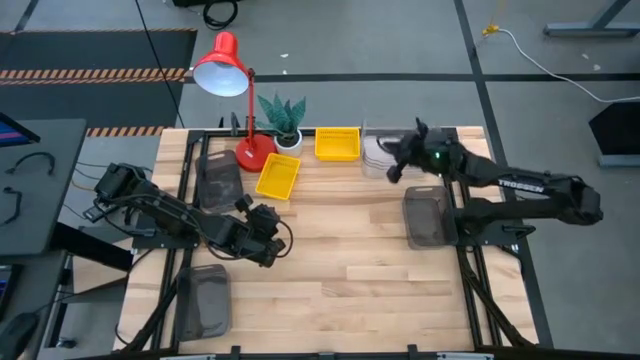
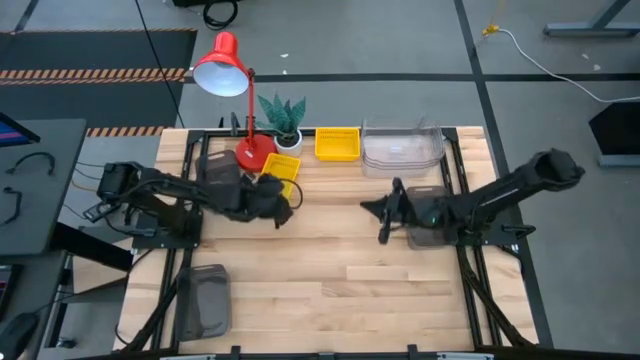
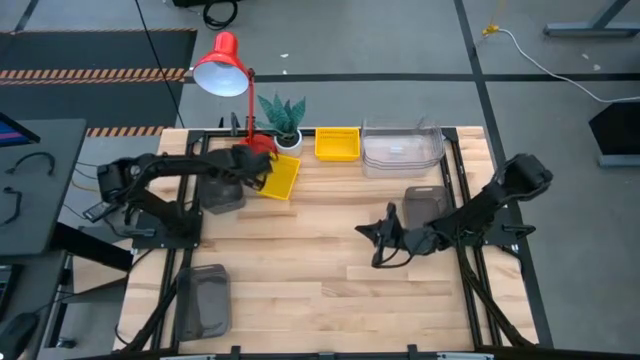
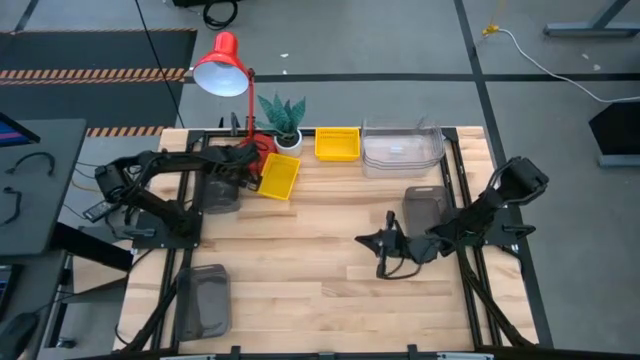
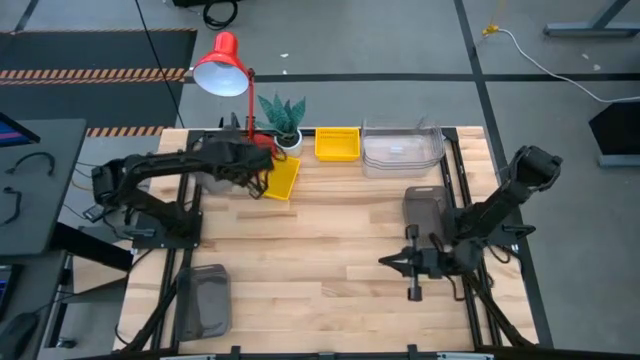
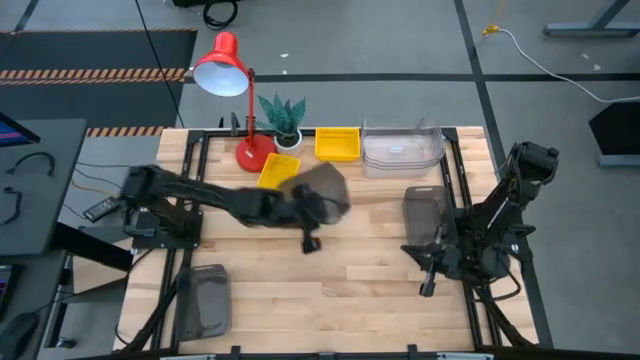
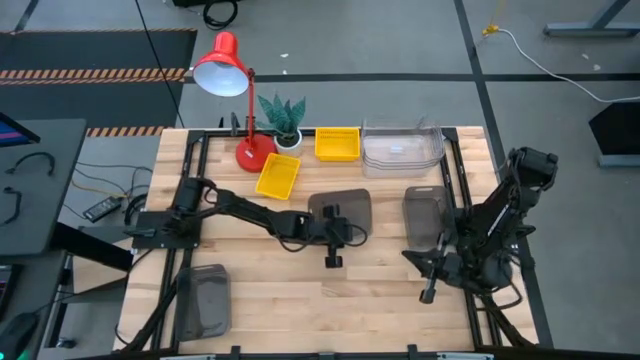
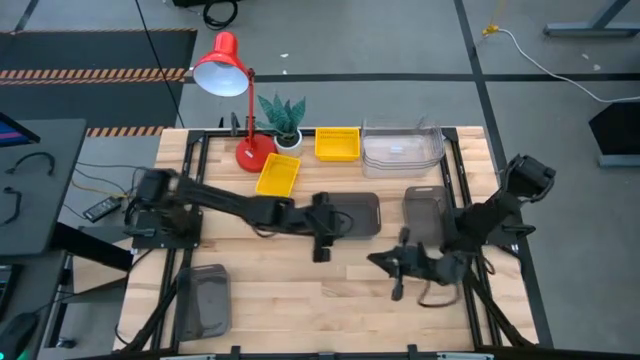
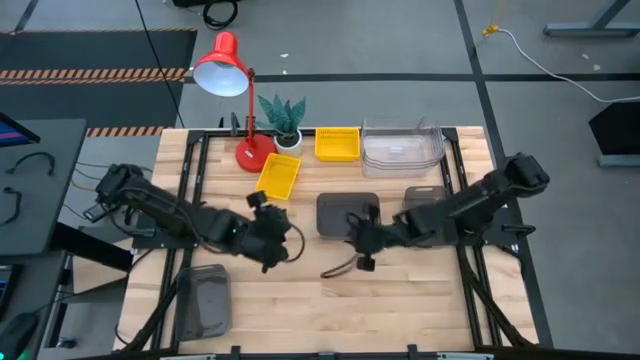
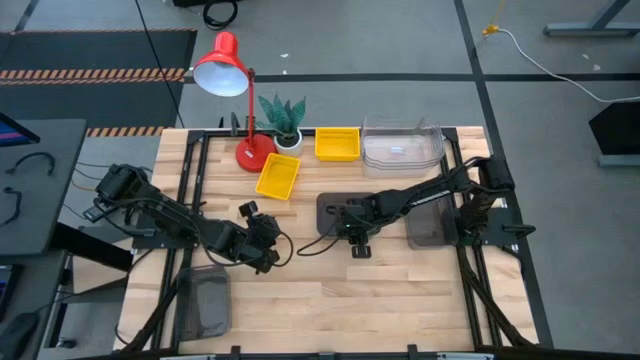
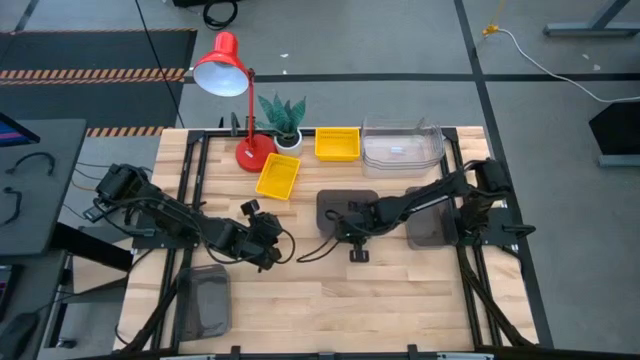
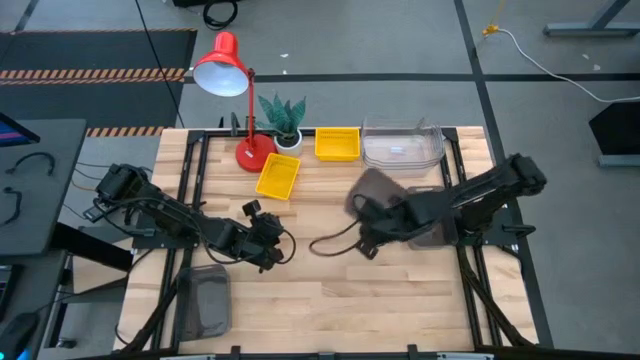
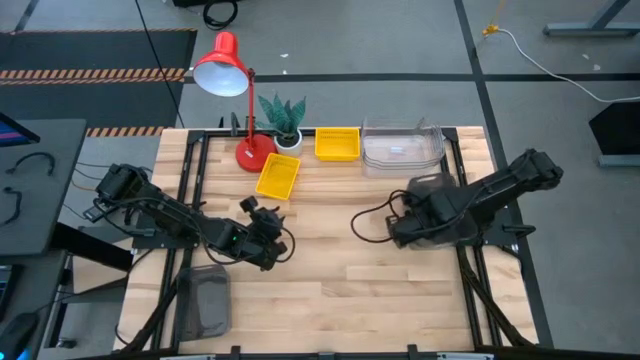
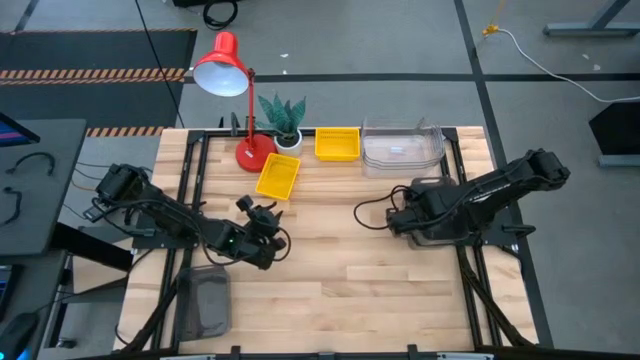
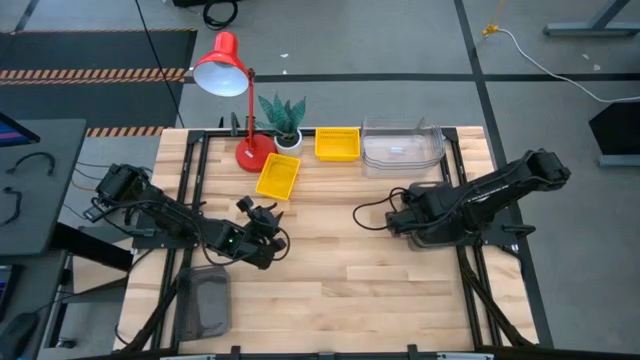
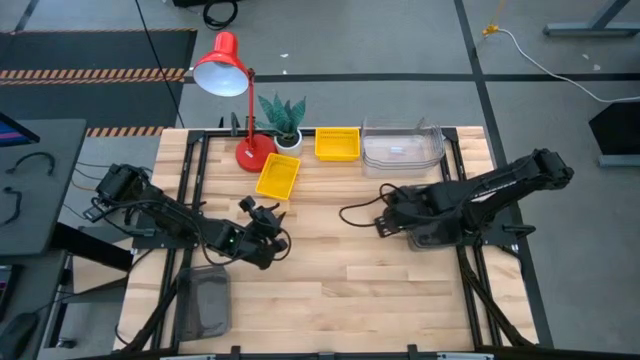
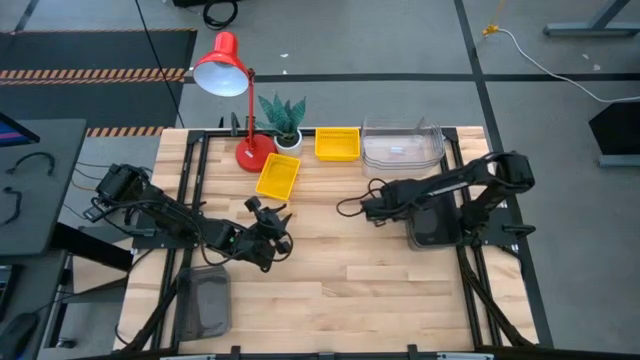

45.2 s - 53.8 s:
Stack the top black transparent bin on top of the middle black transparent bin

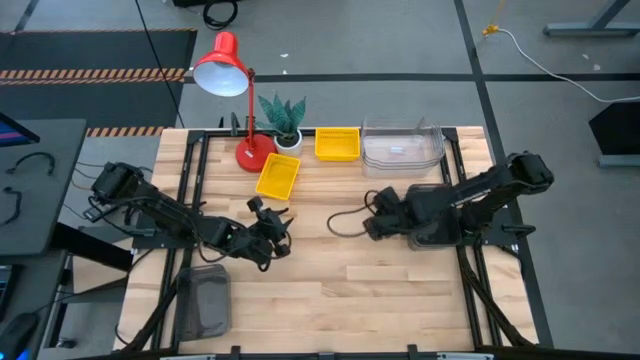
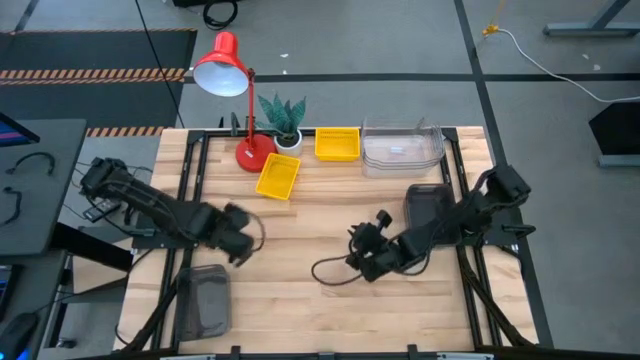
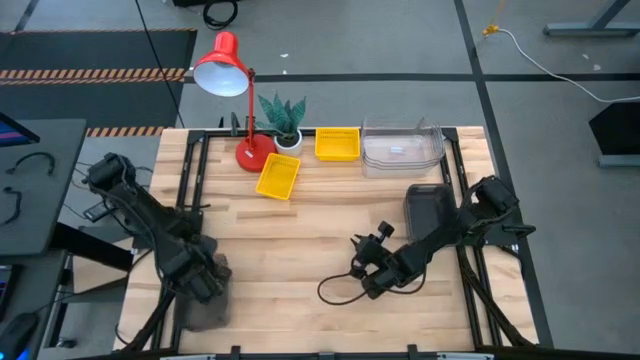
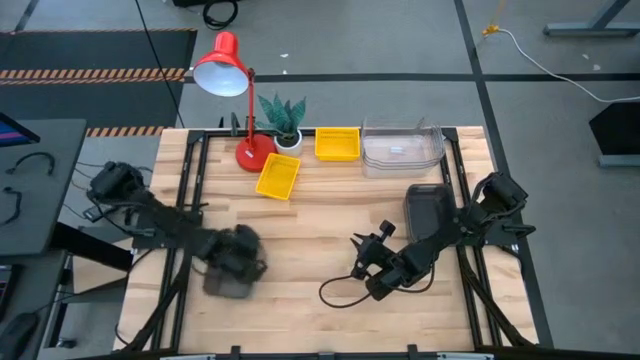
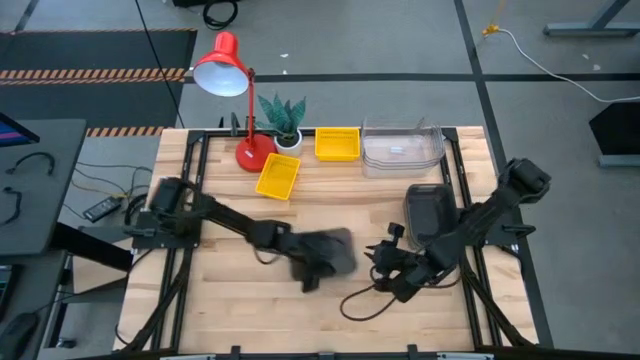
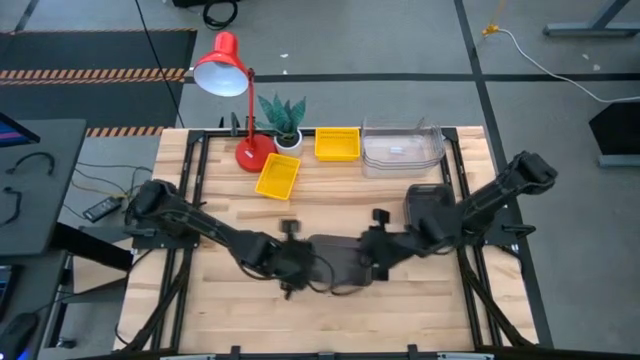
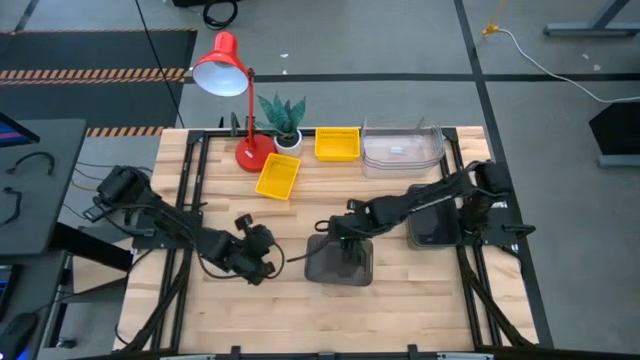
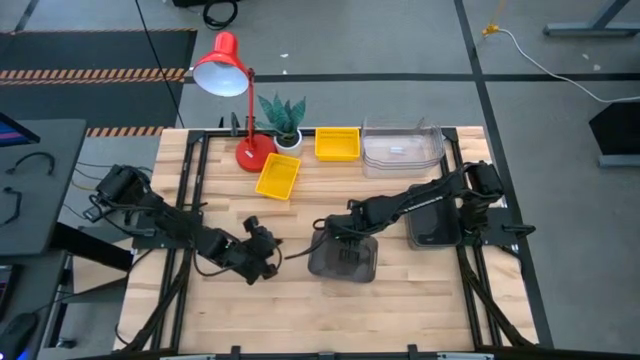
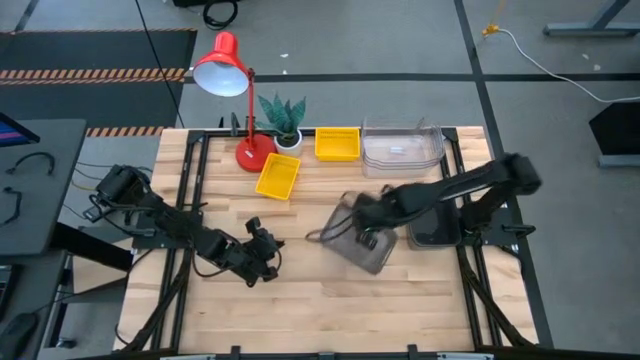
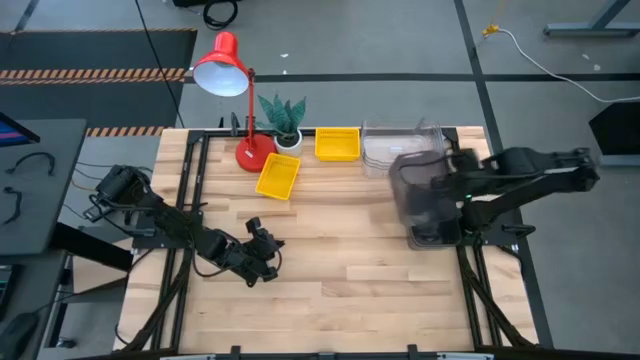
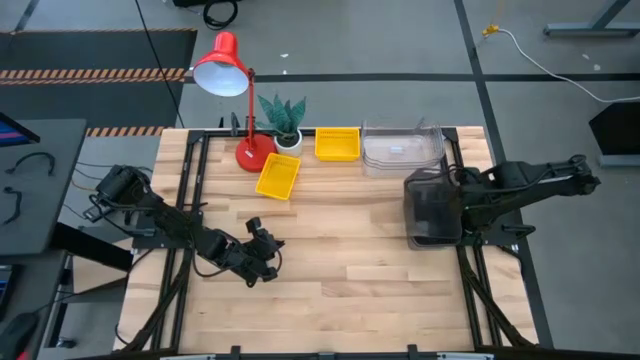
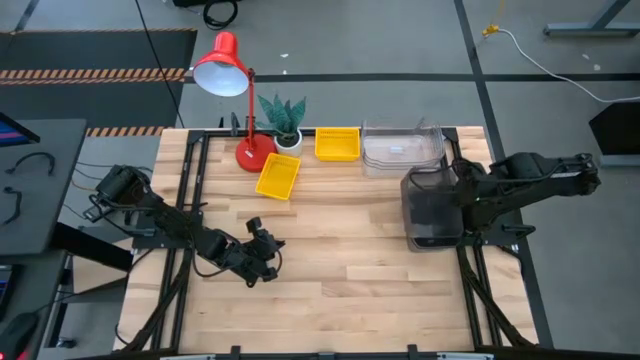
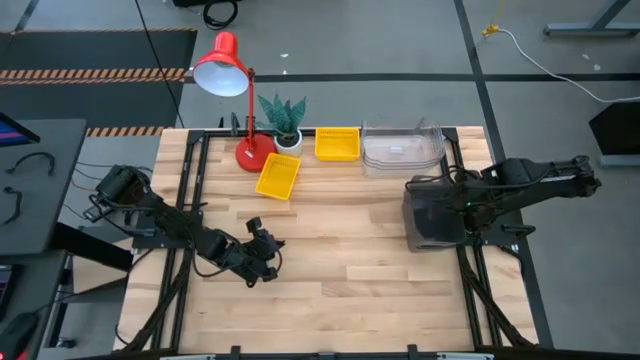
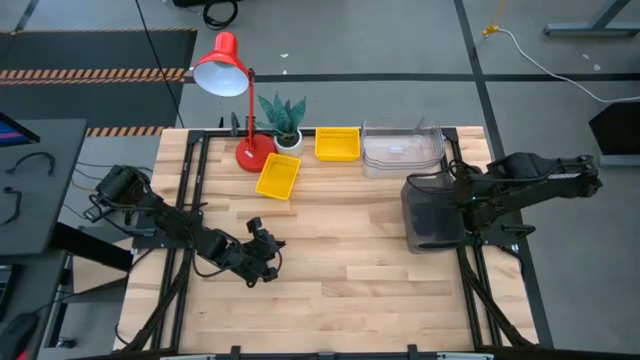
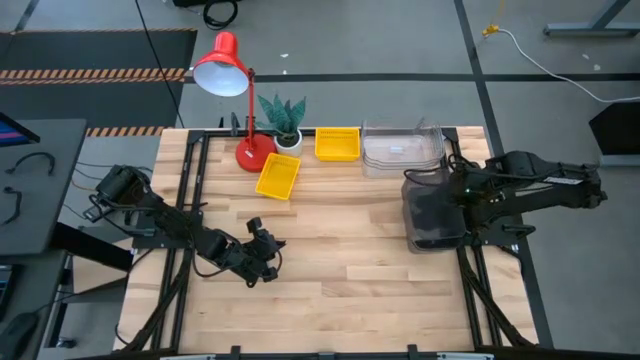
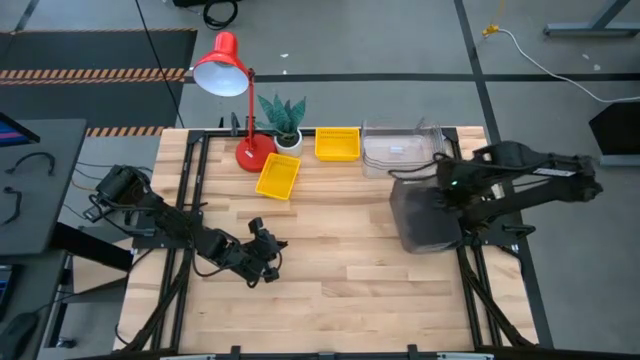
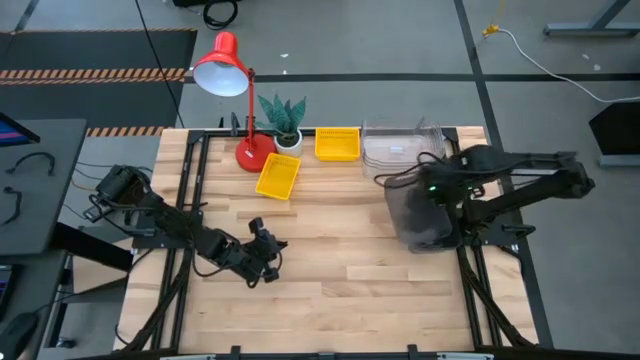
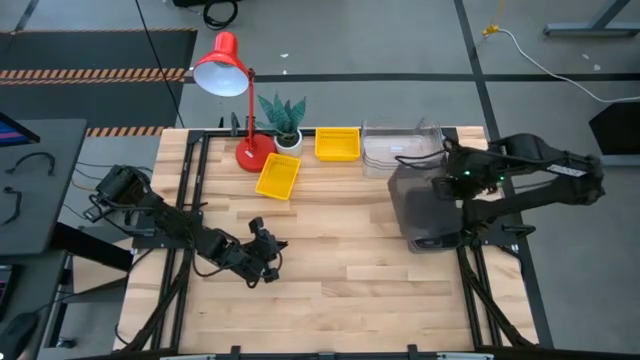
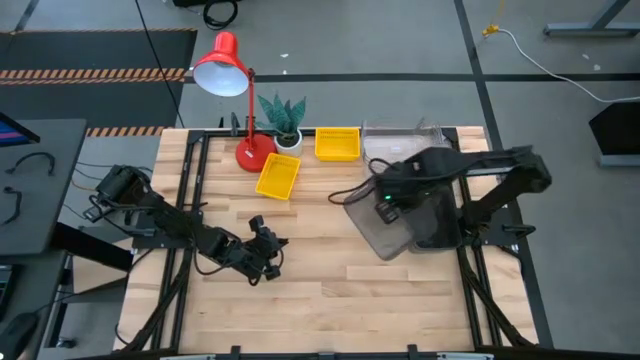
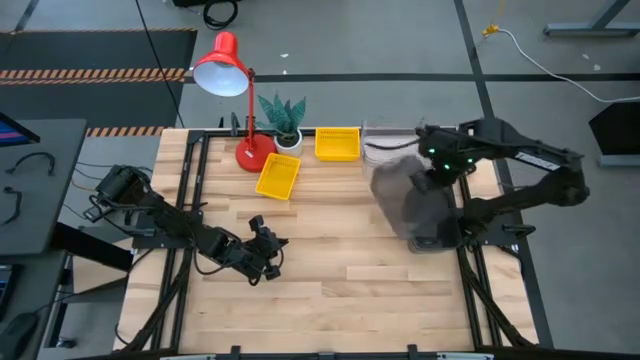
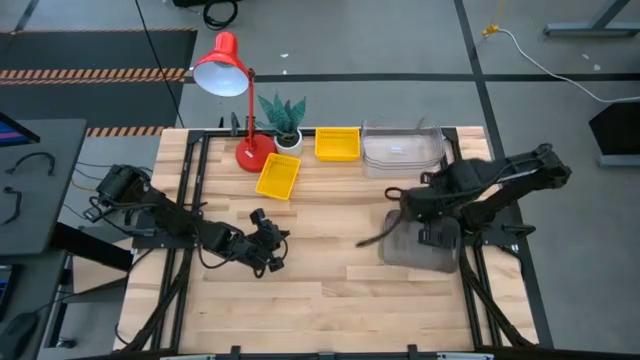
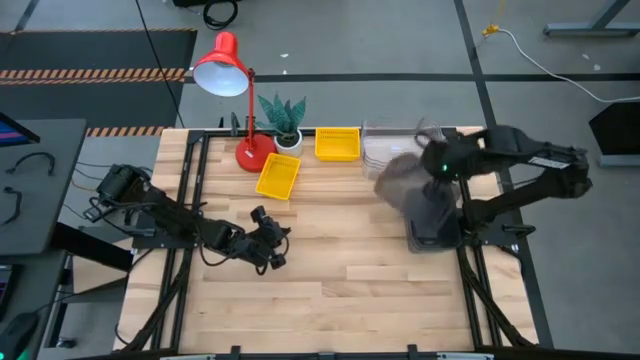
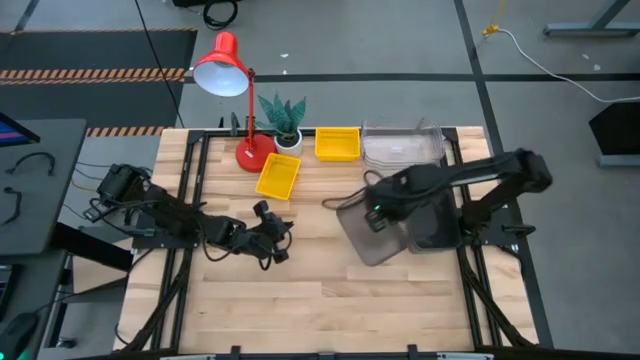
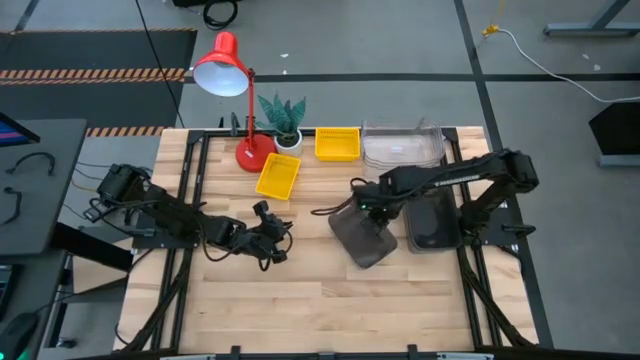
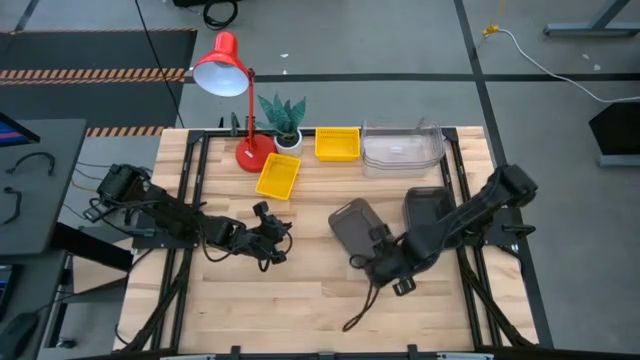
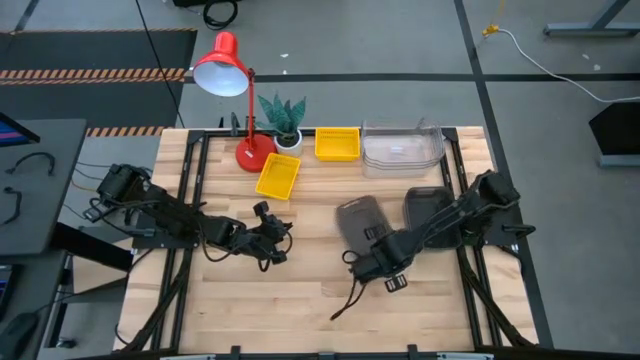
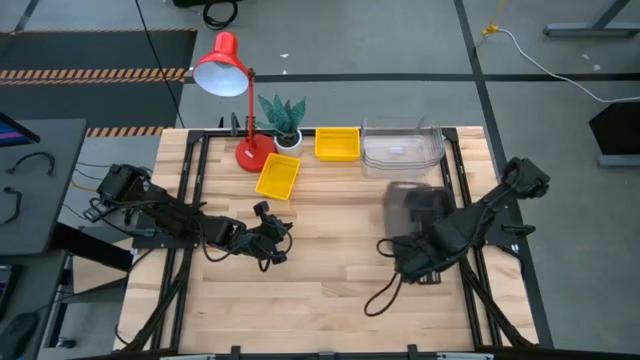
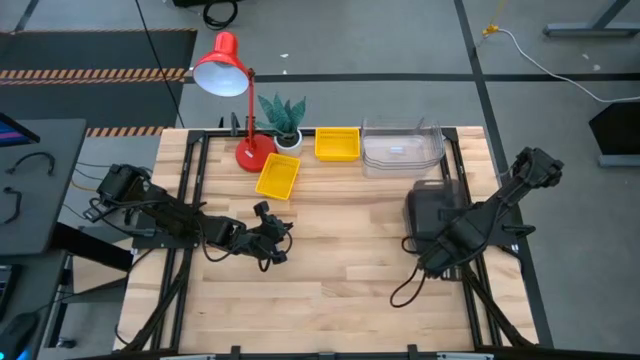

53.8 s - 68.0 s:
Stack the bottom transparent bin on top of the top black transparent bins
